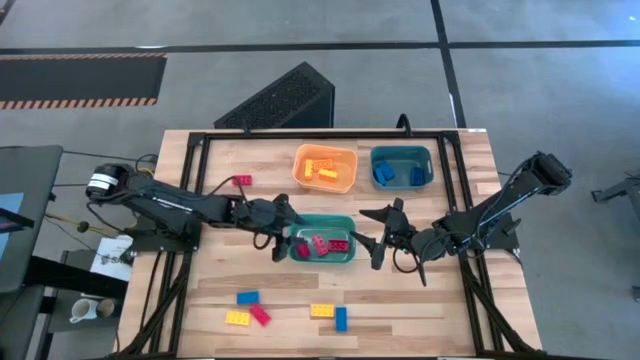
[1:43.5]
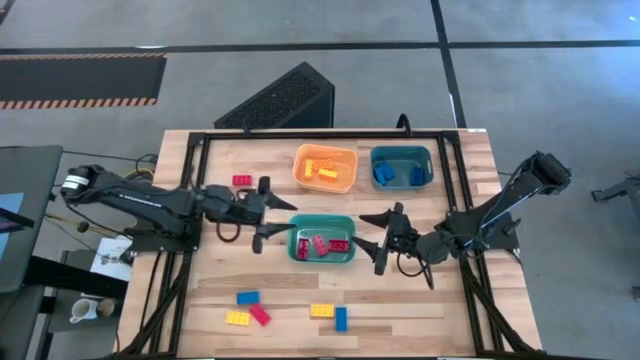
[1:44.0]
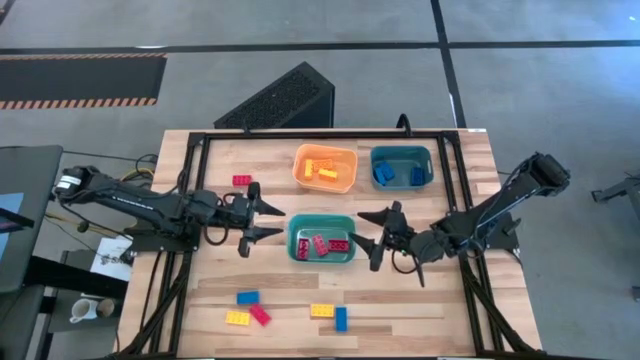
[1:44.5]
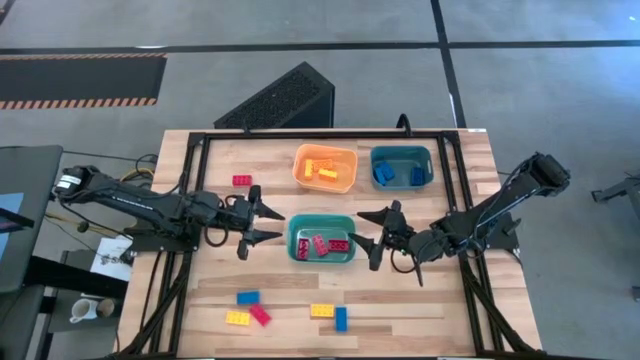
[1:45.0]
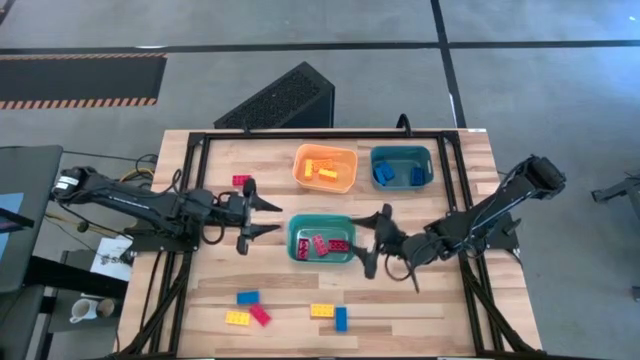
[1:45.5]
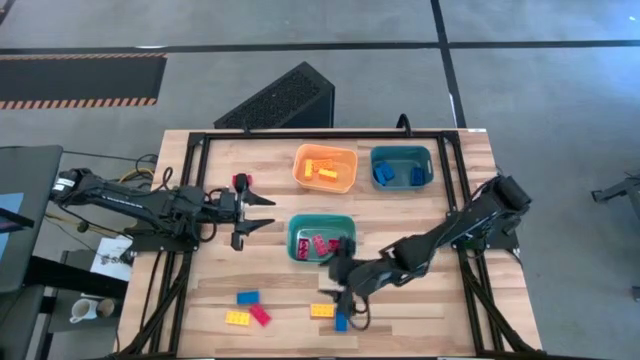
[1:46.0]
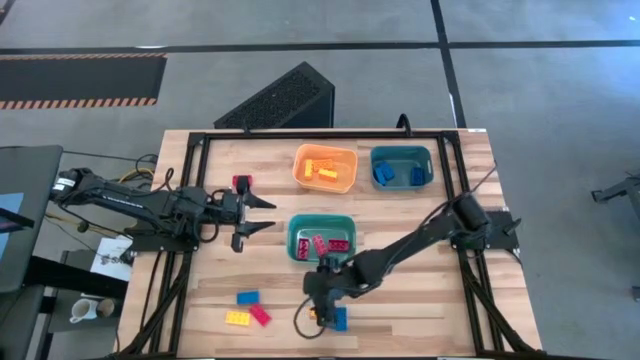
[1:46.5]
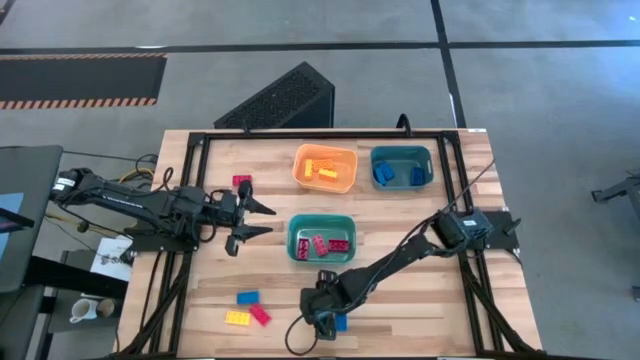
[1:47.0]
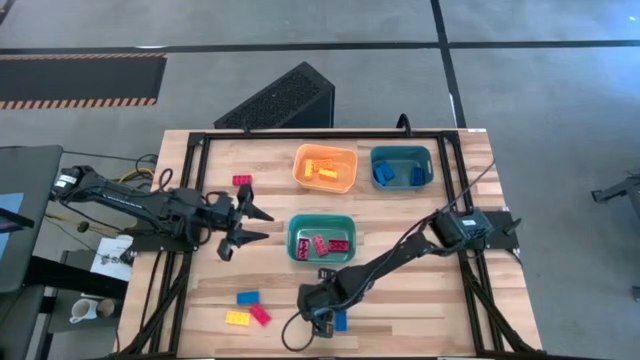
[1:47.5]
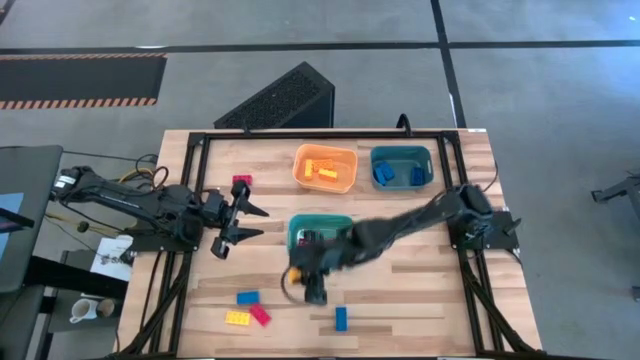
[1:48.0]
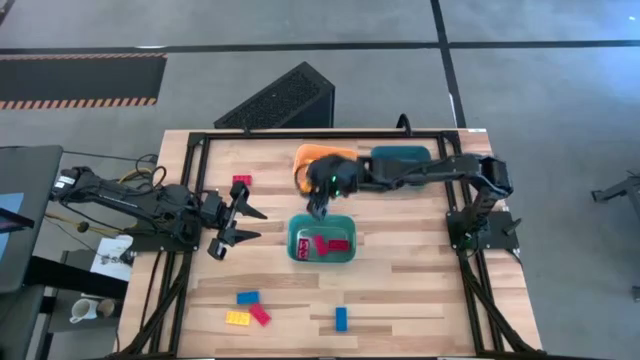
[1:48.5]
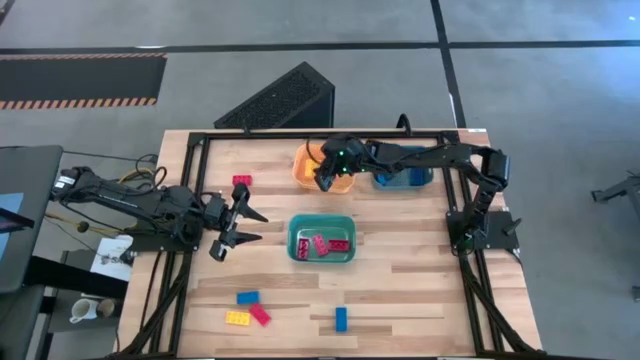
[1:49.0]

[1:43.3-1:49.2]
Task: Sort & place blocks by color
Put the yellow game piece into the yellow bin

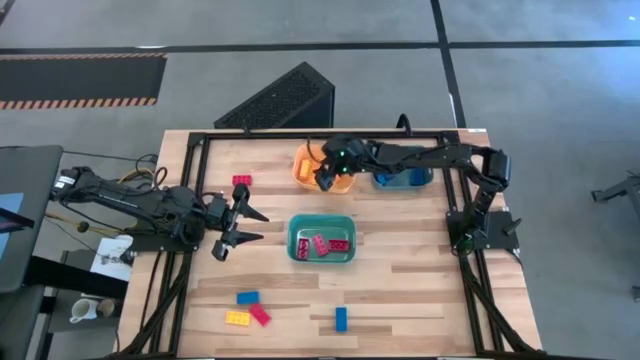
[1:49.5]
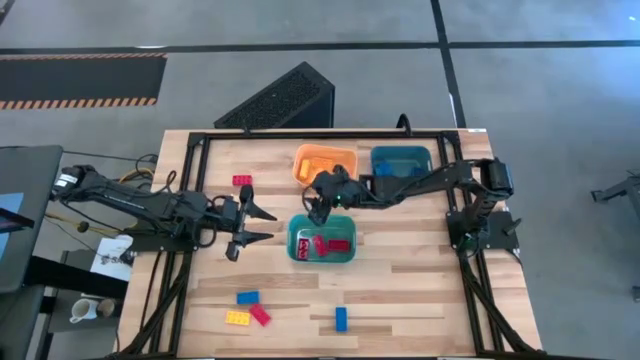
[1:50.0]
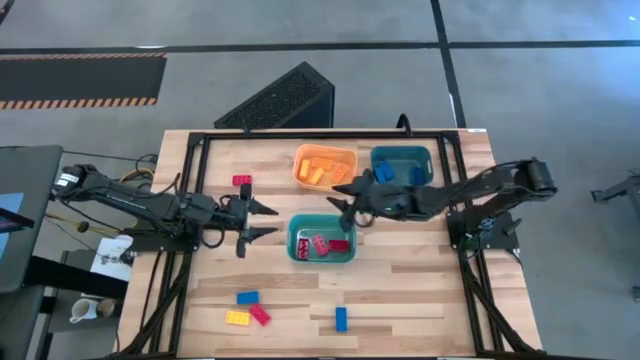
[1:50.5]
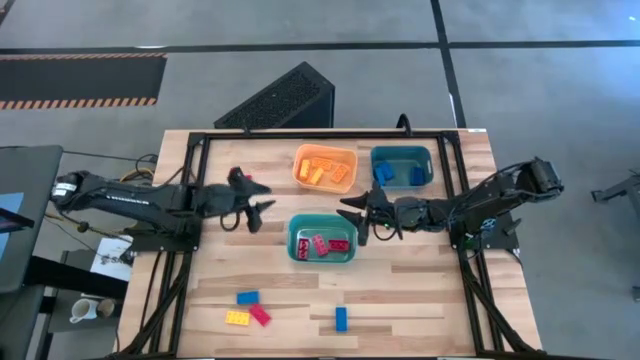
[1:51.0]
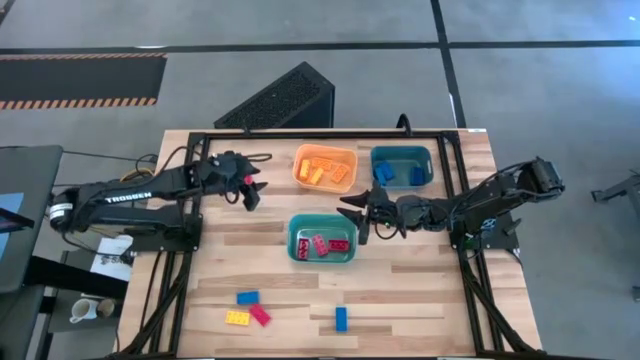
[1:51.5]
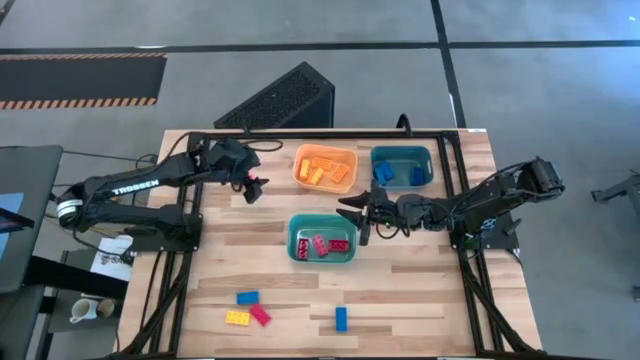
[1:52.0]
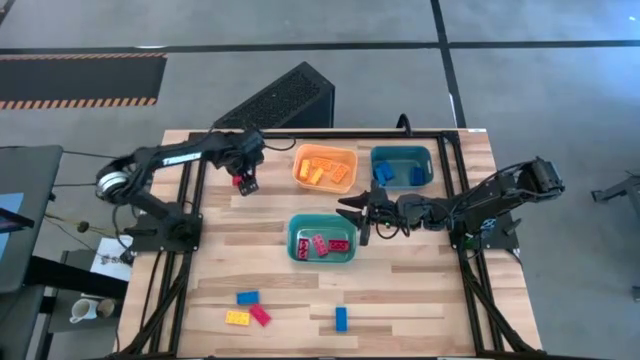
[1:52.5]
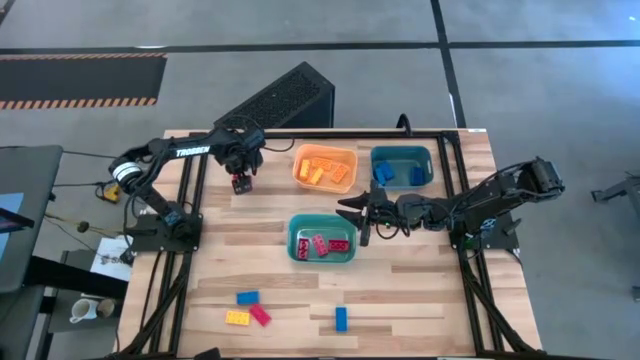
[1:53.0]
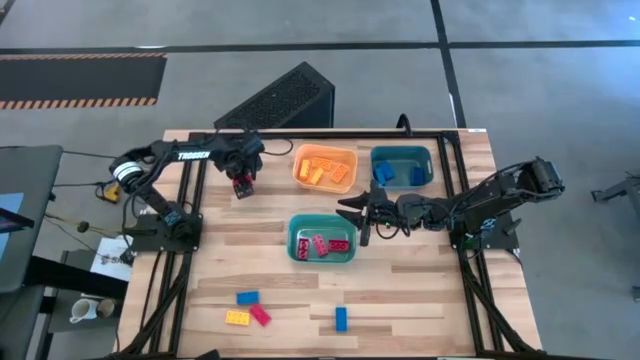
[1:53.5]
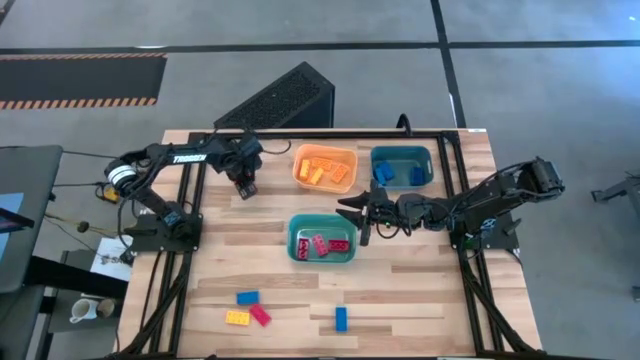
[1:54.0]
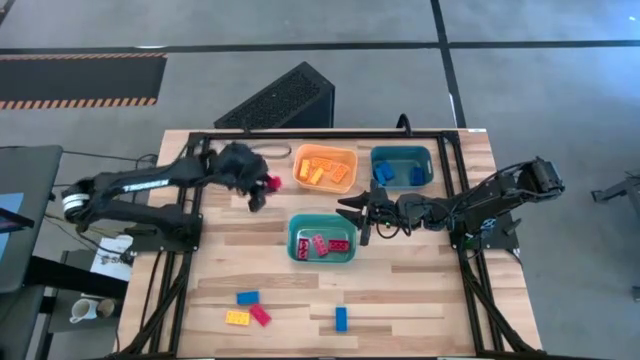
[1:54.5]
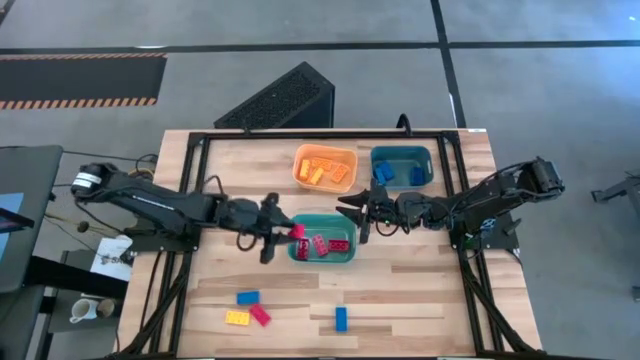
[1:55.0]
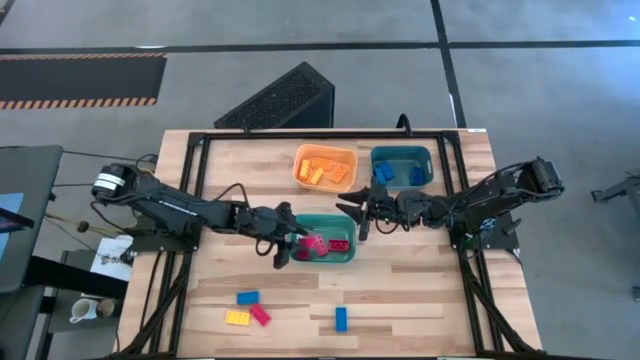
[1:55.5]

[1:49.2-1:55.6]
Put the red game piece into the green bin

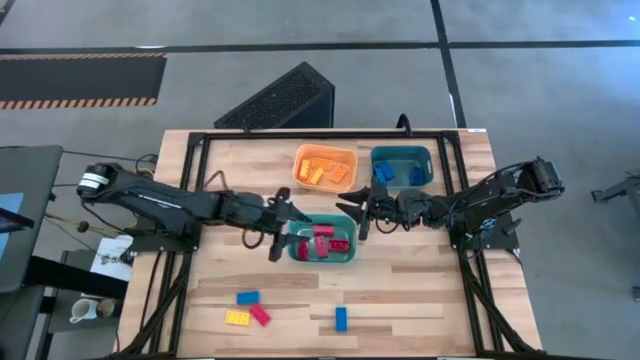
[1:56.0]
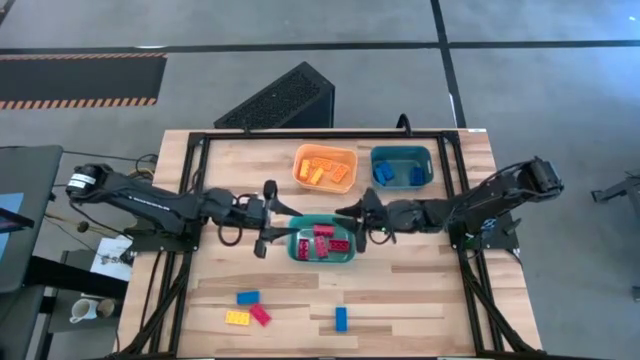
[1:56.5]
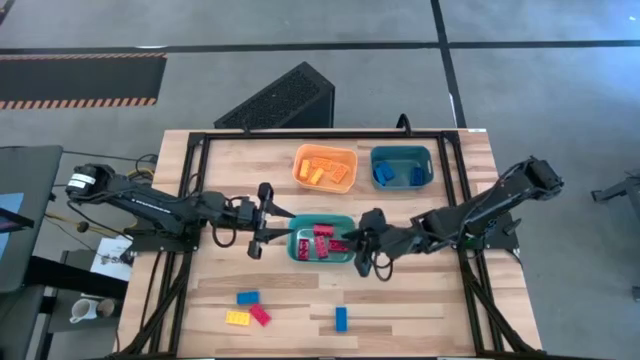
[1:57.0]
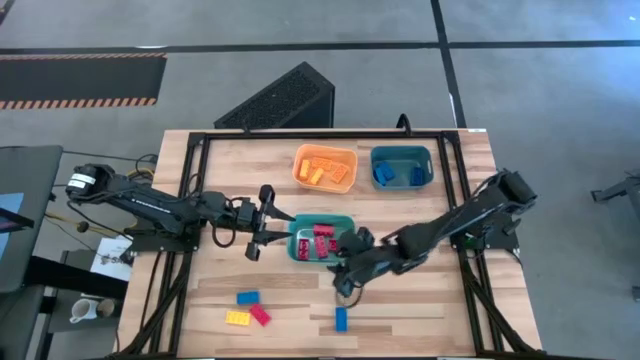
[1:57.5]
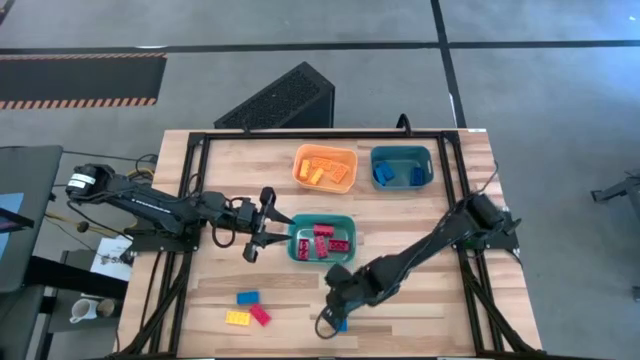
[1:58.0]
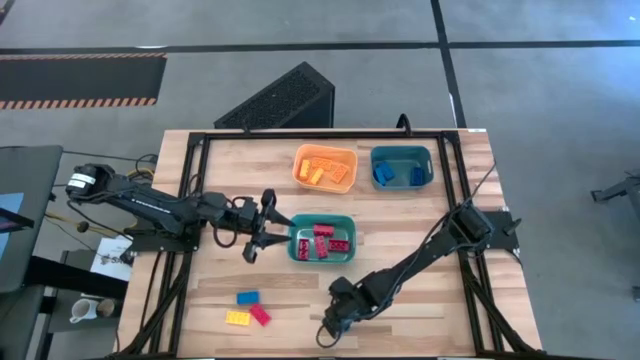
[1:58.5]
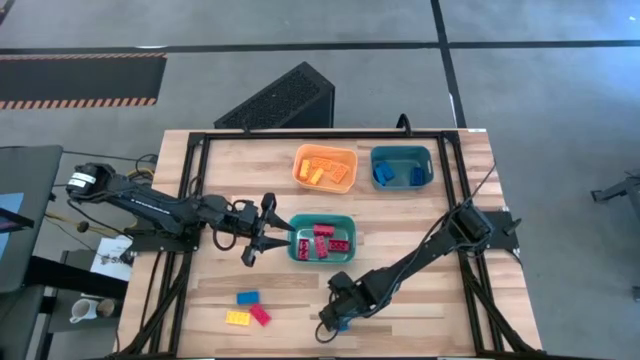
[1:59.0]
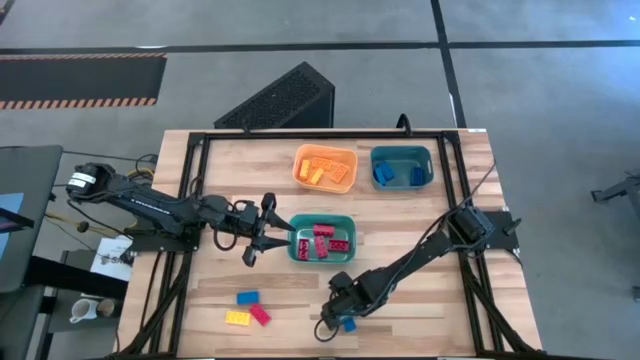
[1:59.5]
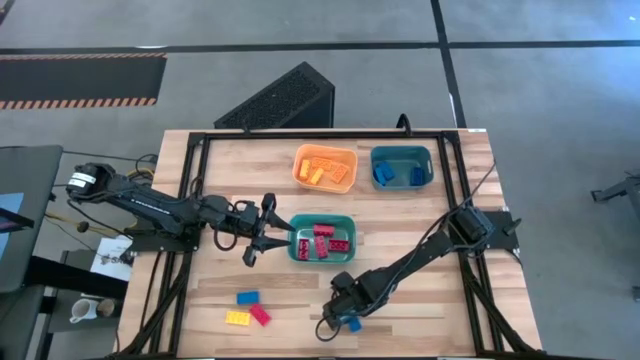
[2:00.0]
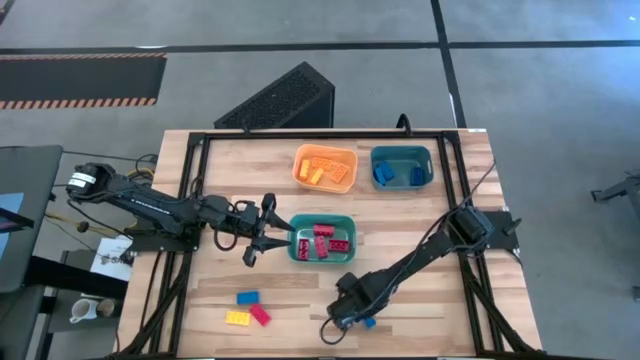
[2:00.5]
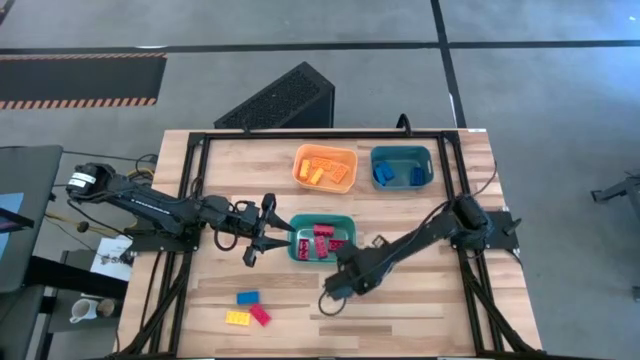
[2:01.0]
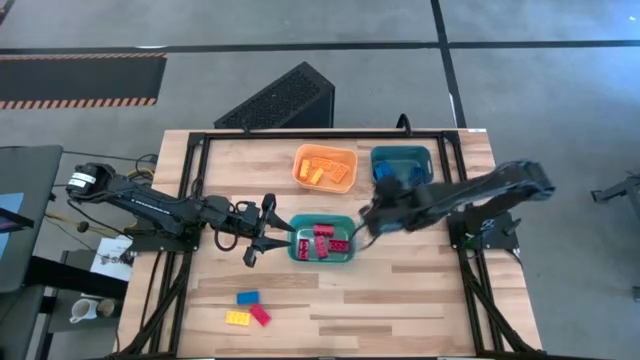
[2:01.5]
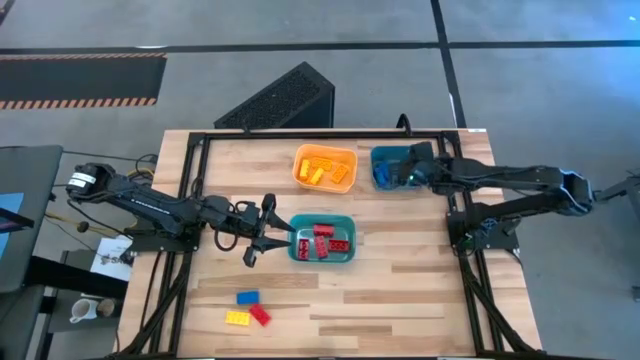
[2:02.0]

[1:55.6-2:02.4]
Put the blue game piece into the blue bin
